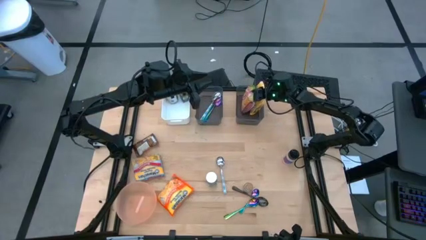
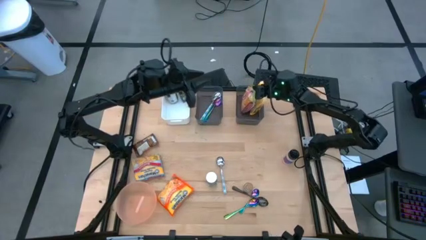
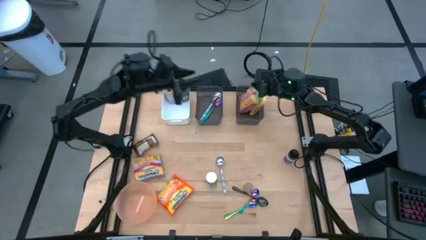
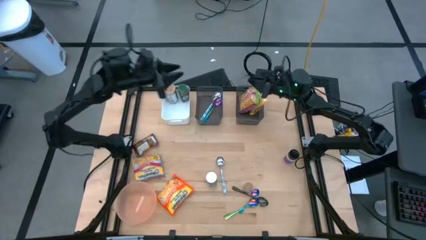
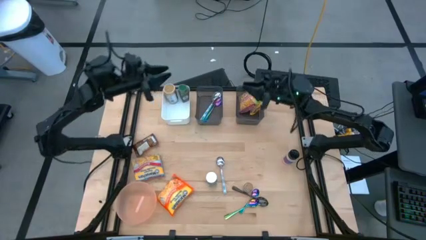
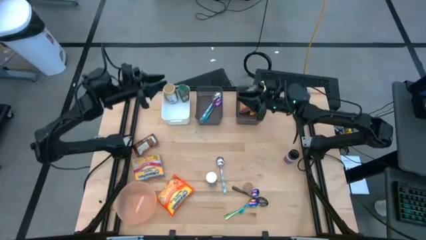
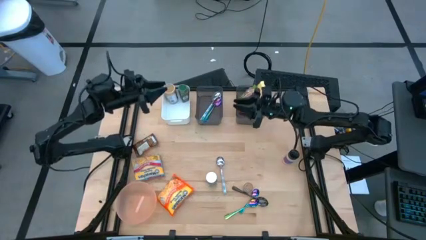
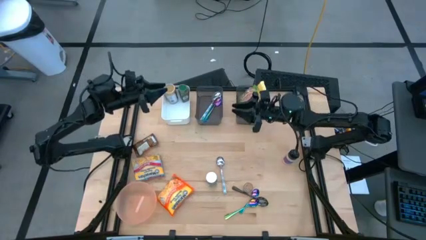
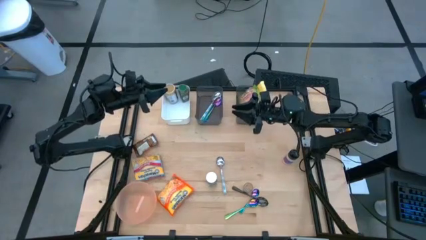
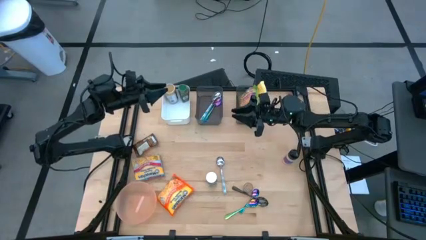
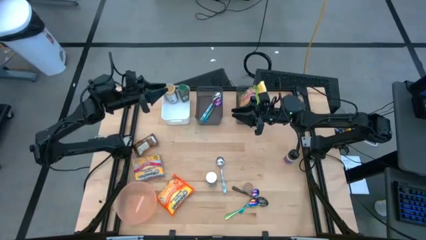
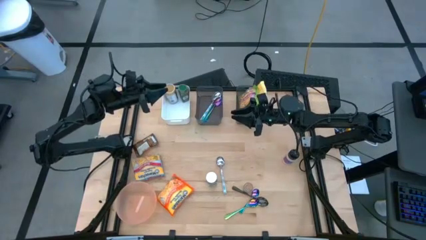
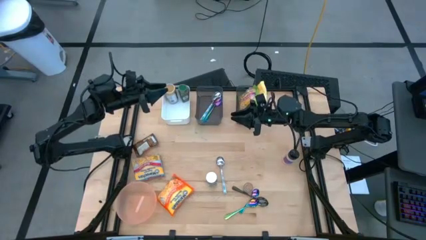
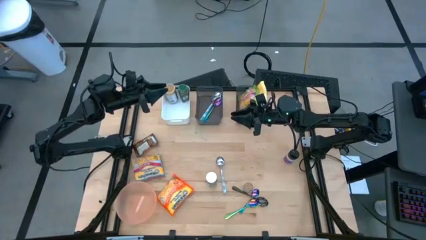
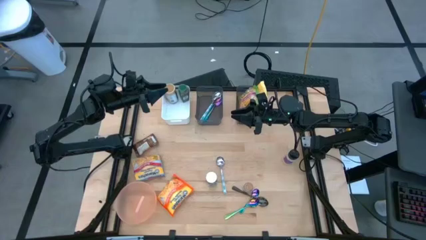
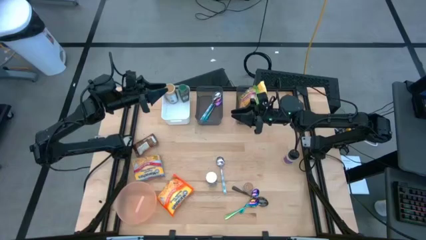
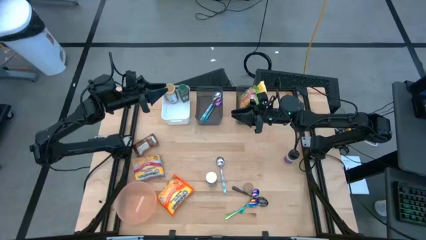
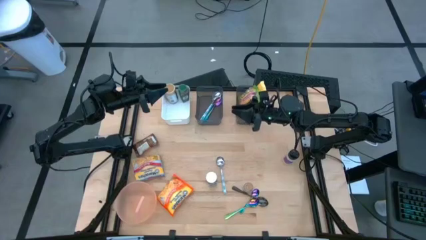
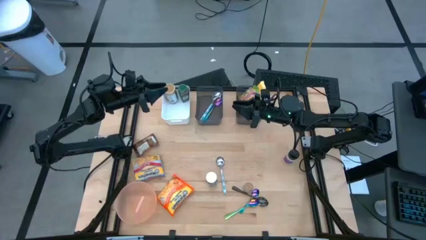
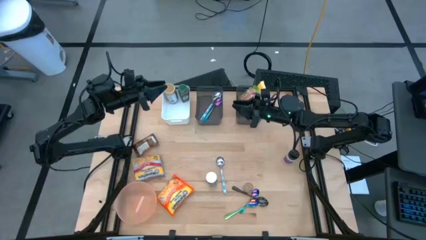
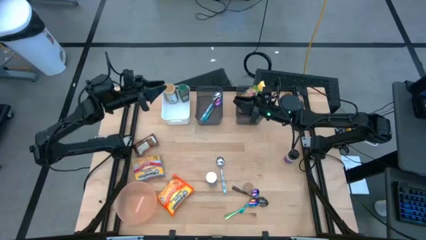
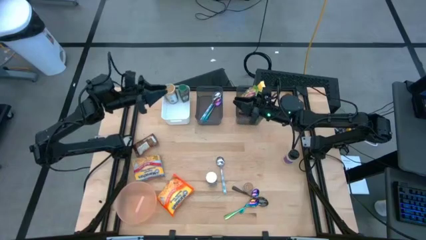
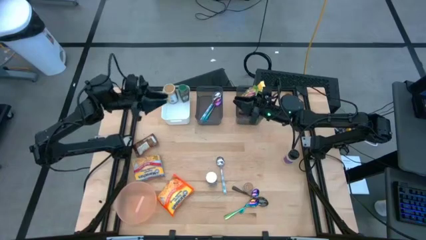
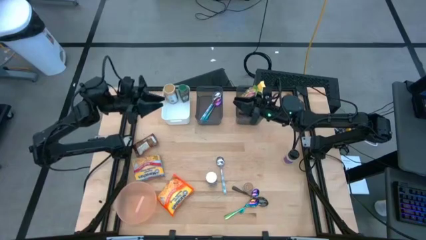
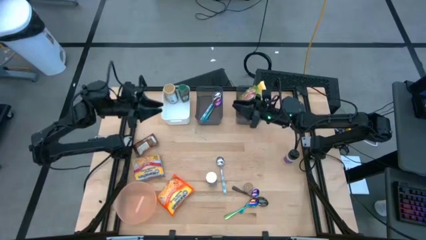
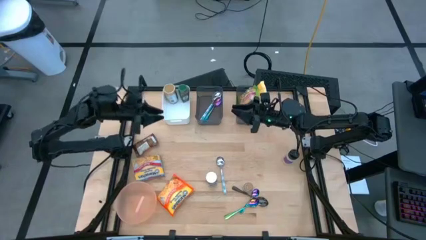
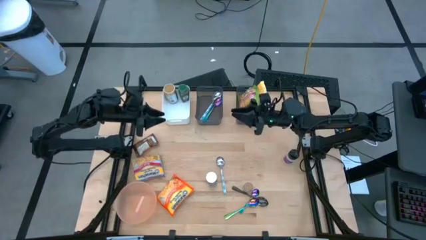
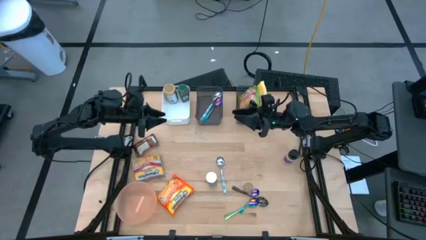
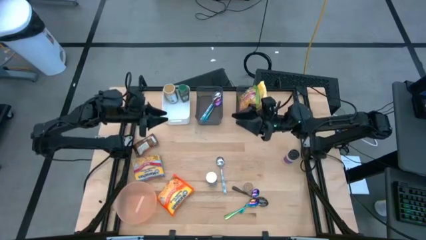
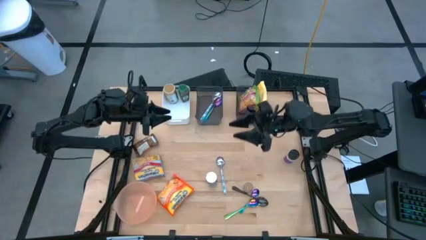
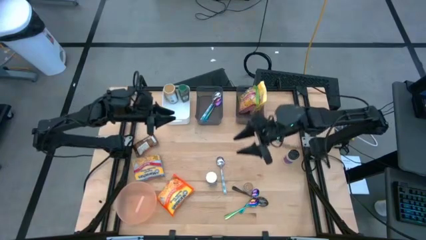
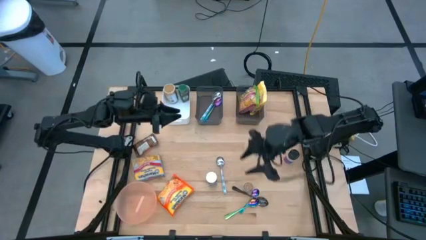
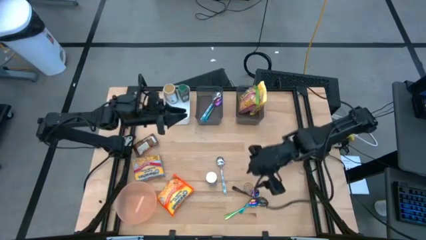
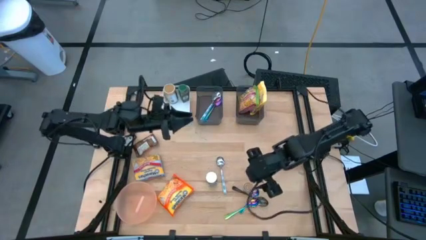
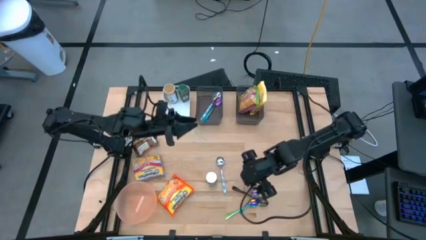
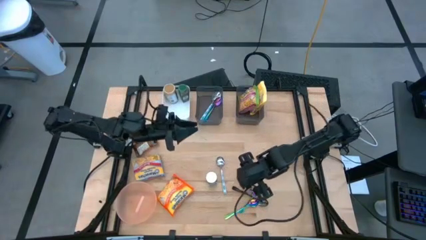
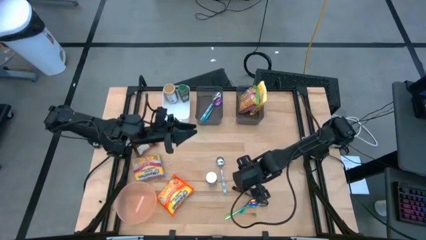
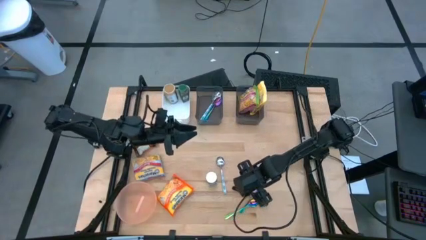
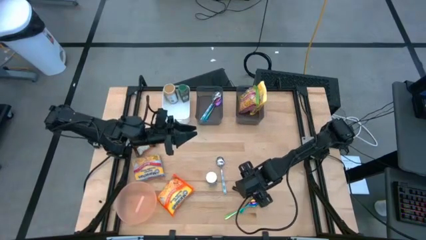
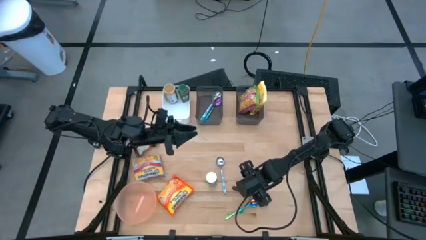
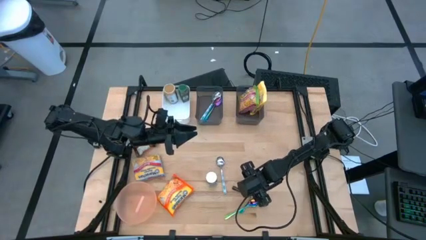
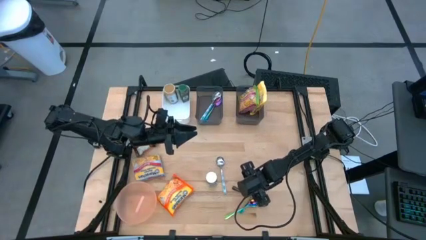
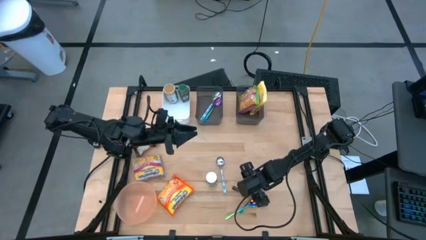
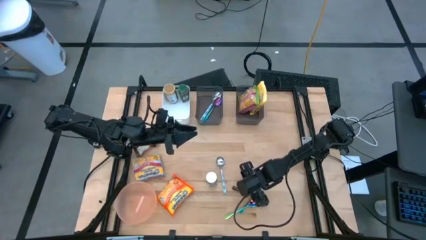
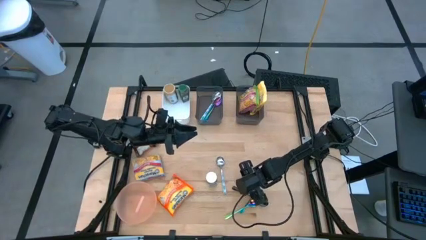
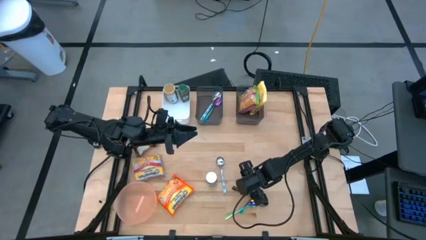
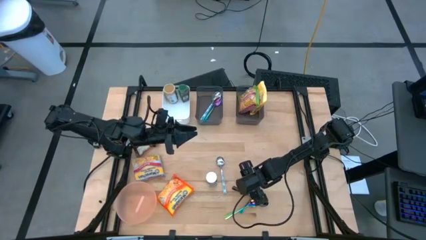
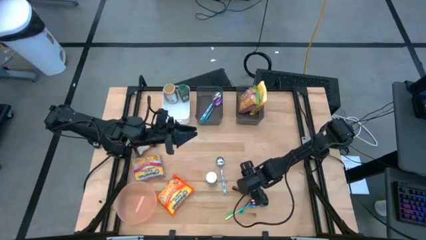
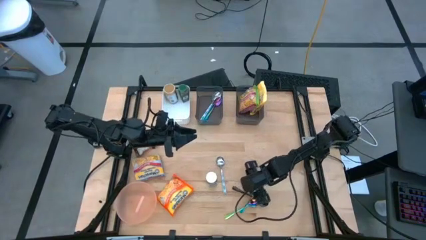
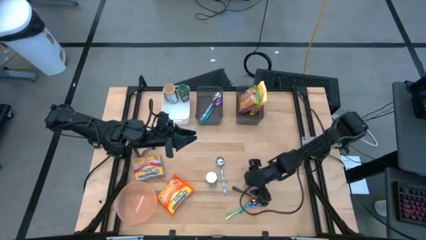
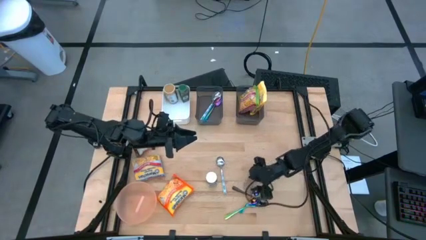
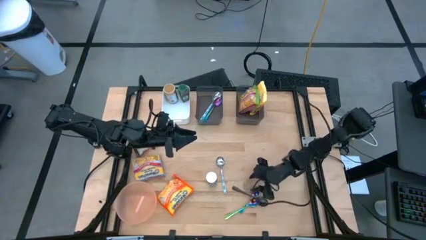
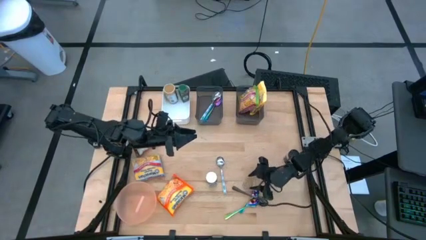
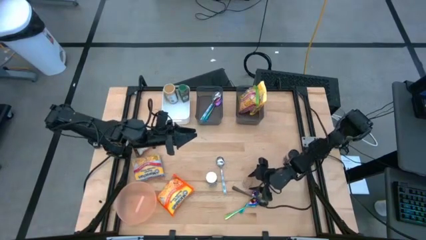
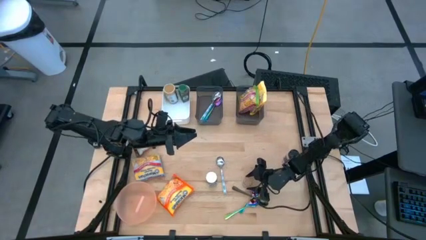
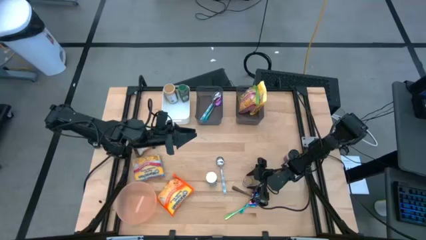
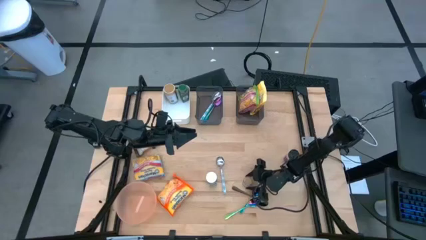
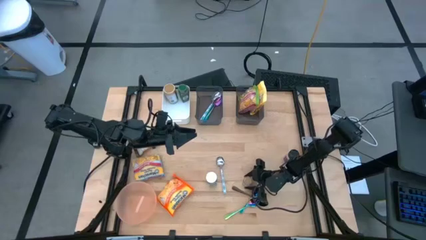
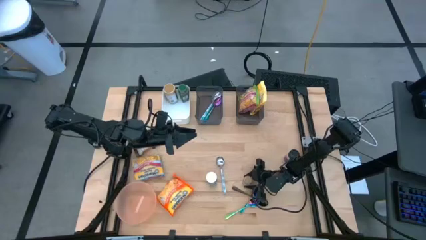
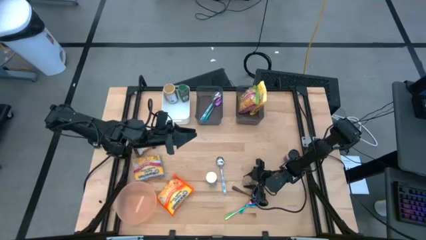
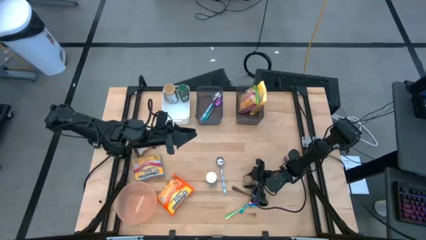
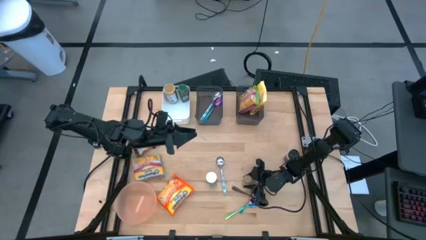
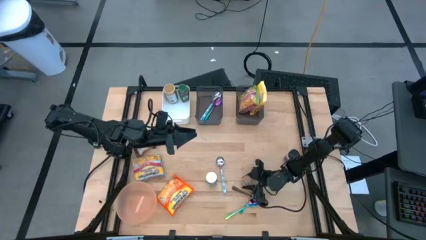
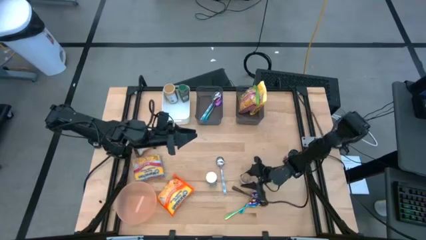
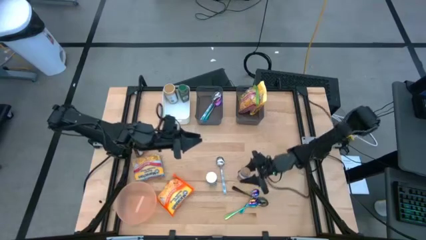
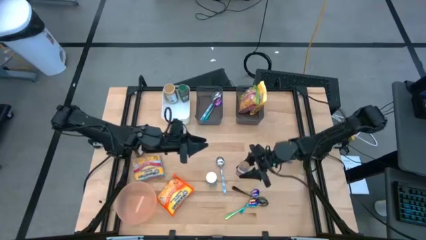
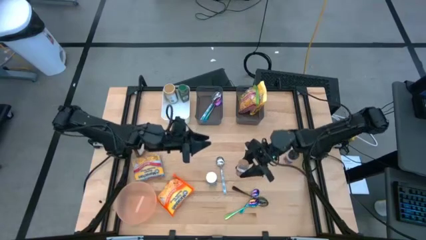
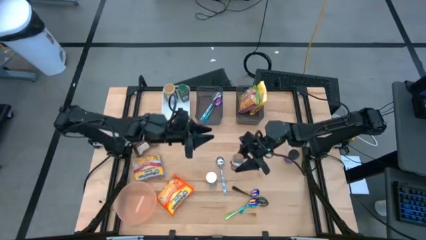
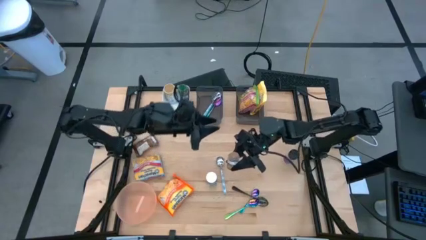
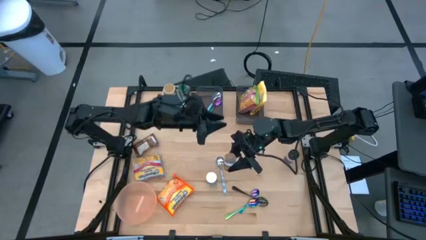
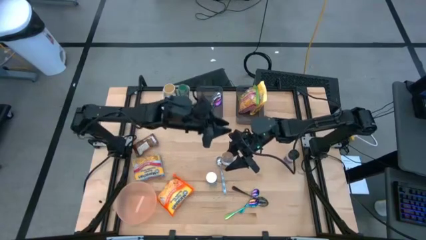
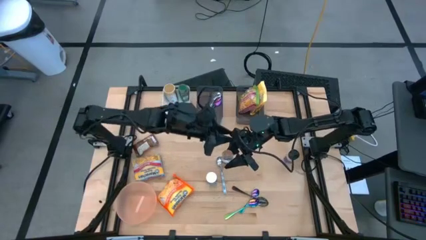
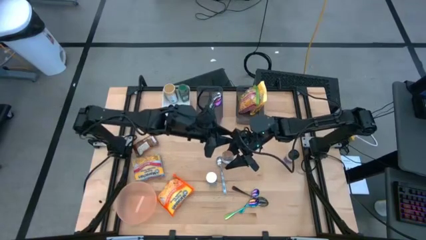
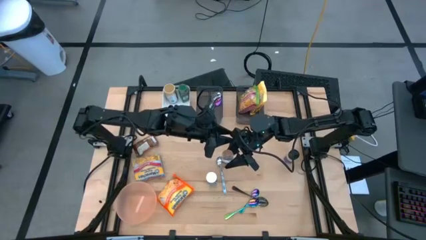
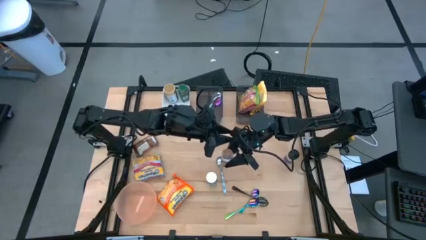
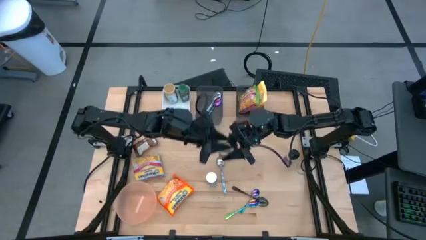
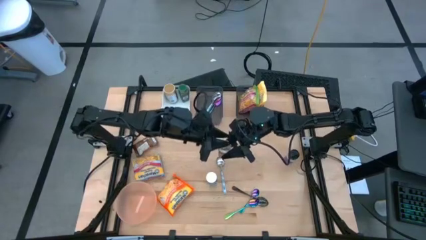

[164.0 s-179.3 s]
Task: Pick & Place Food Item
Put the brown seasoning bottle into the white bin

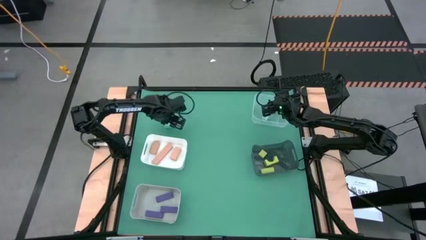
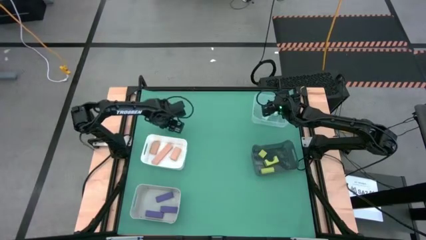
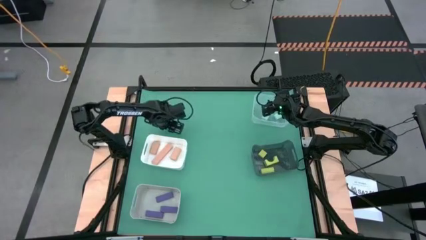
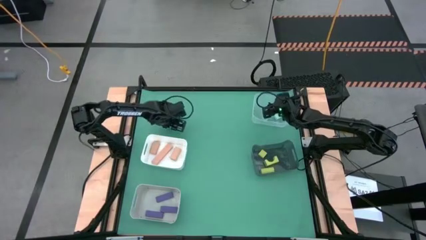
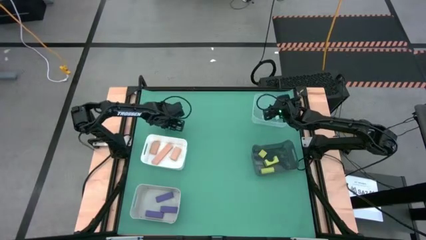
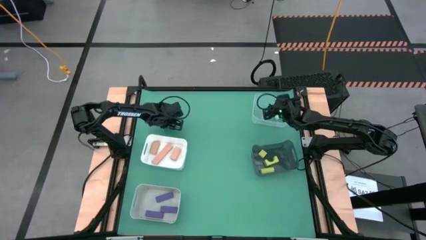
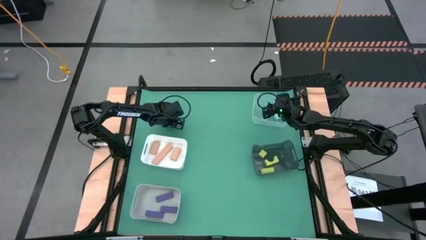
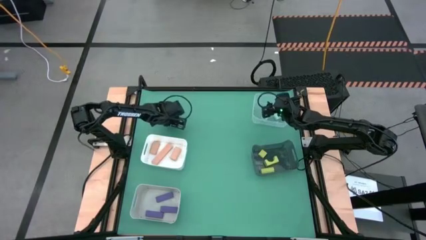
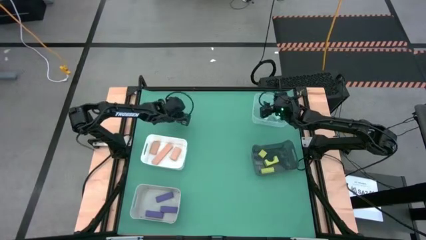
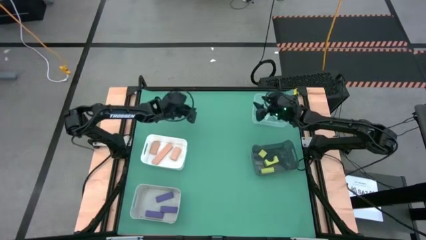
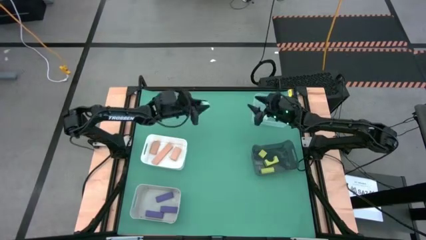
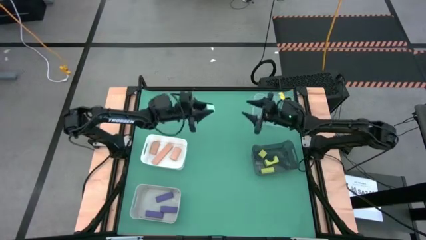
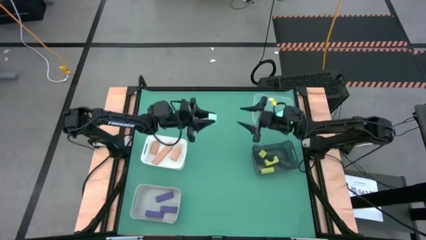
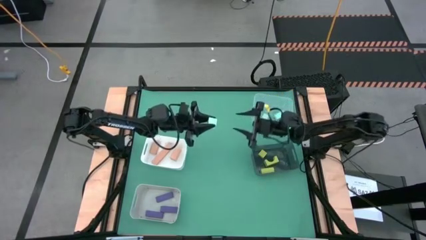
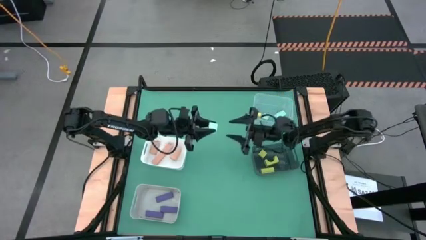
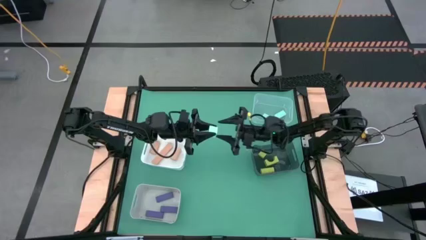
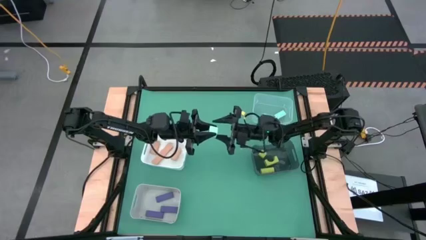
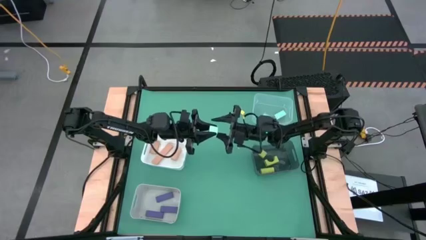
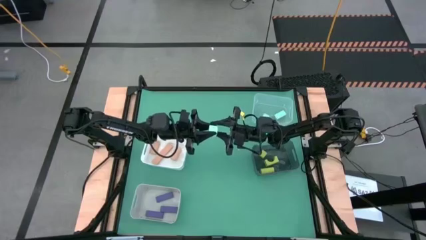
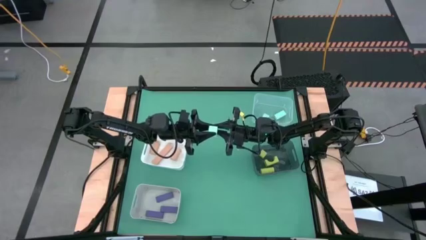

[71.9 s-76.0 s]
Task: Sort & place blocks by color
Put the blue block into the transparent bin
